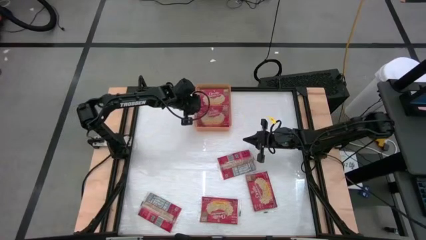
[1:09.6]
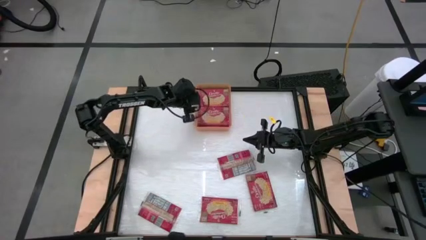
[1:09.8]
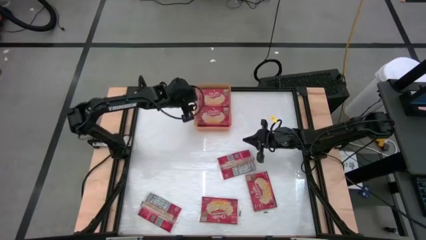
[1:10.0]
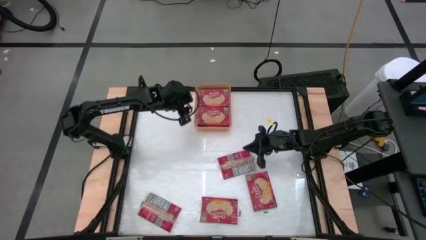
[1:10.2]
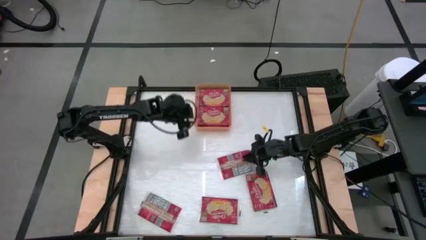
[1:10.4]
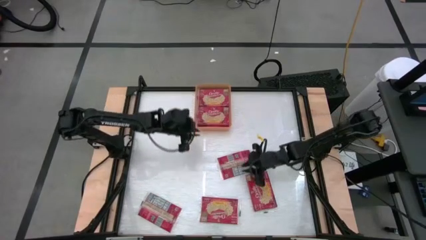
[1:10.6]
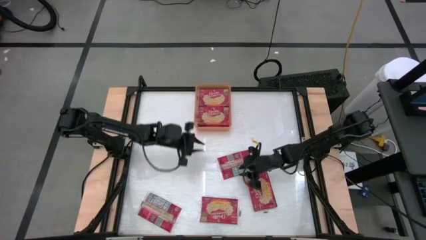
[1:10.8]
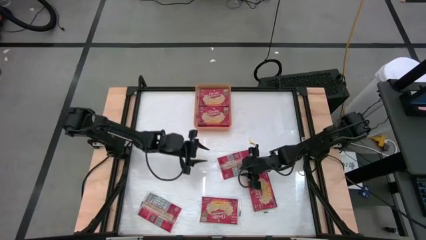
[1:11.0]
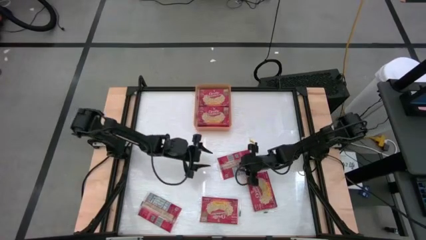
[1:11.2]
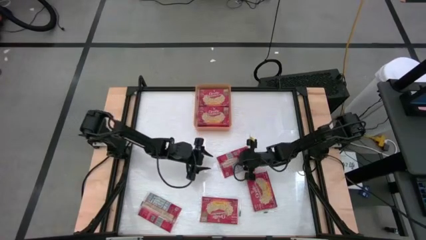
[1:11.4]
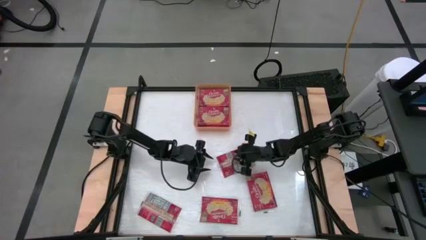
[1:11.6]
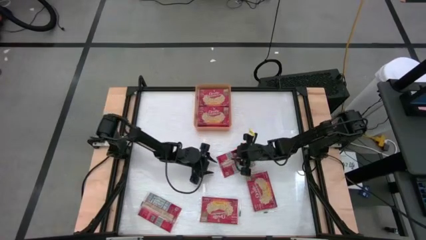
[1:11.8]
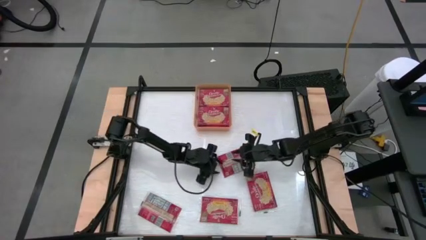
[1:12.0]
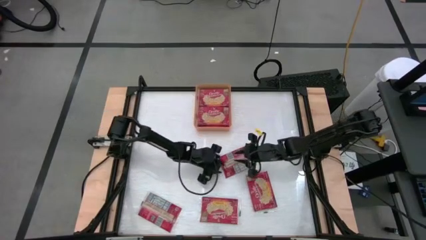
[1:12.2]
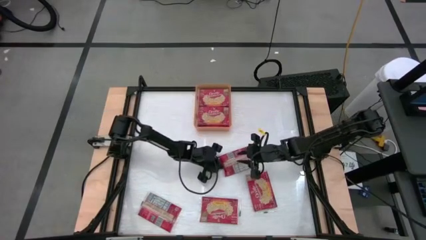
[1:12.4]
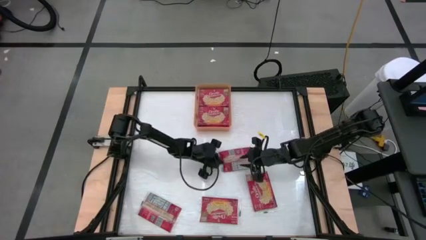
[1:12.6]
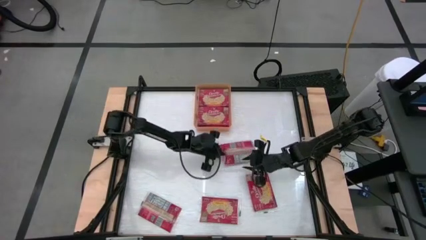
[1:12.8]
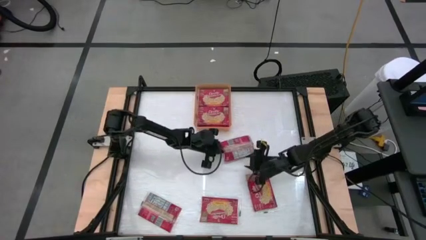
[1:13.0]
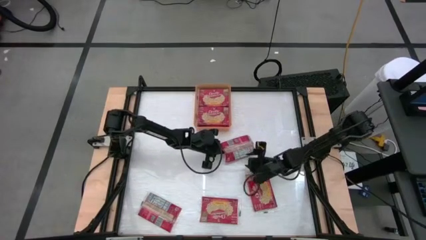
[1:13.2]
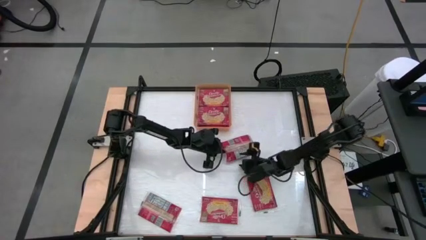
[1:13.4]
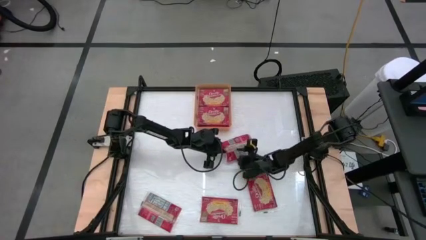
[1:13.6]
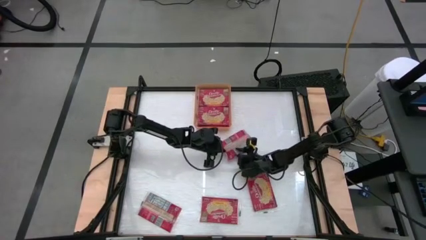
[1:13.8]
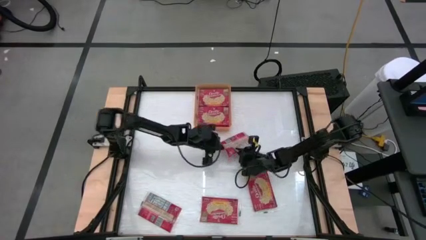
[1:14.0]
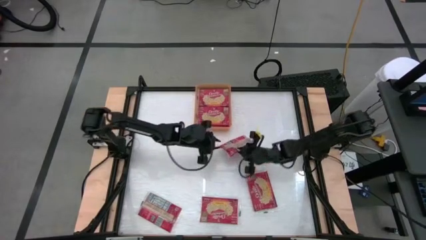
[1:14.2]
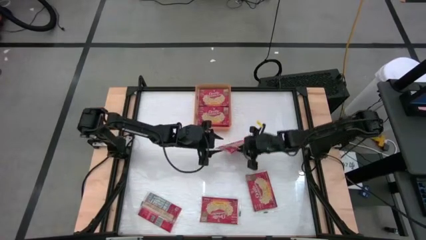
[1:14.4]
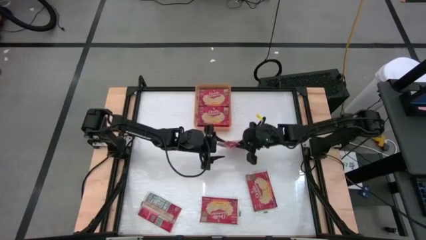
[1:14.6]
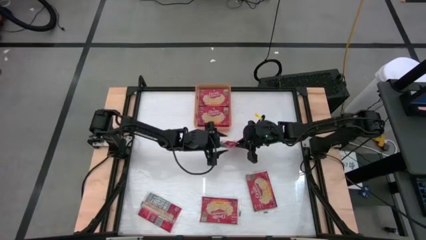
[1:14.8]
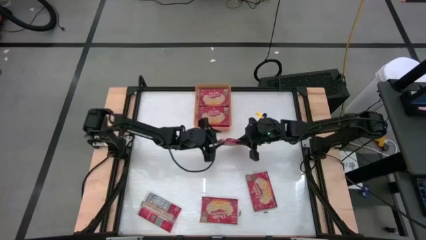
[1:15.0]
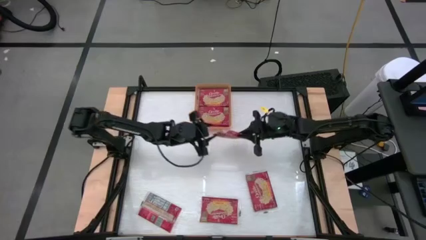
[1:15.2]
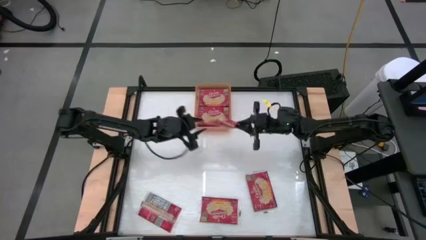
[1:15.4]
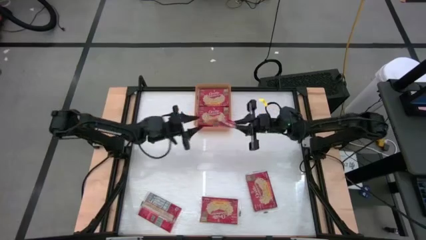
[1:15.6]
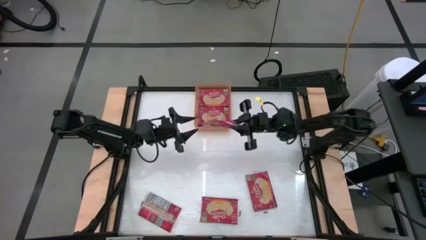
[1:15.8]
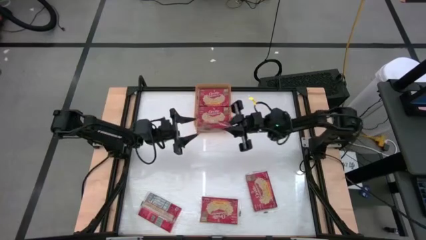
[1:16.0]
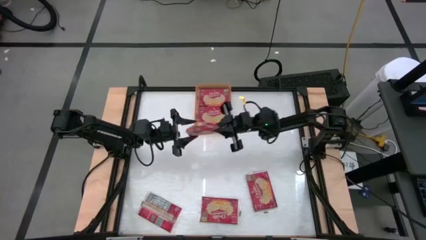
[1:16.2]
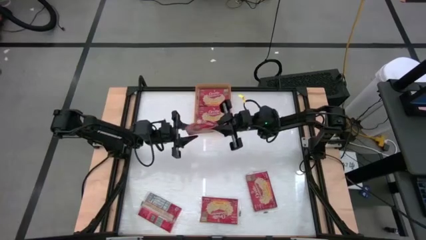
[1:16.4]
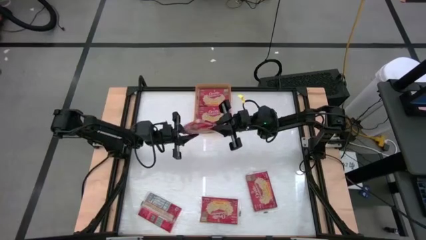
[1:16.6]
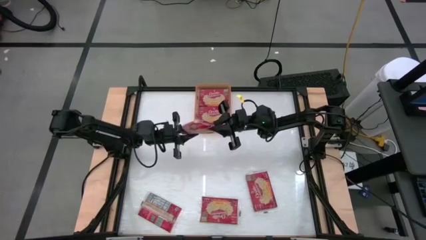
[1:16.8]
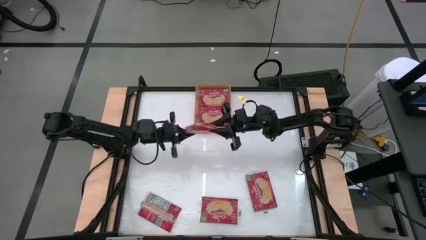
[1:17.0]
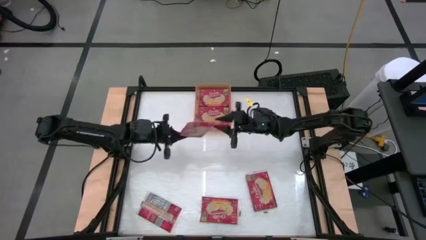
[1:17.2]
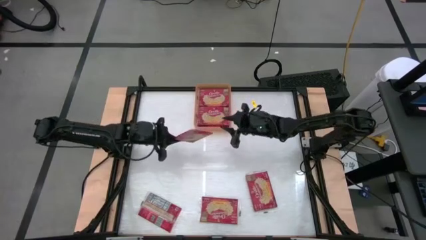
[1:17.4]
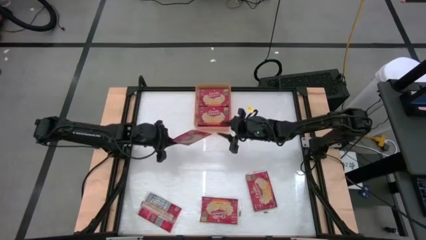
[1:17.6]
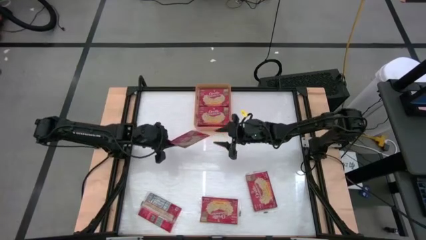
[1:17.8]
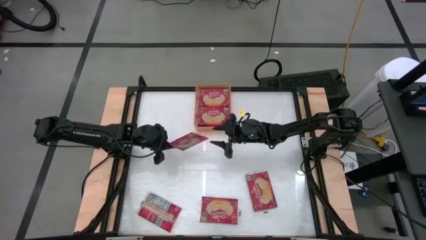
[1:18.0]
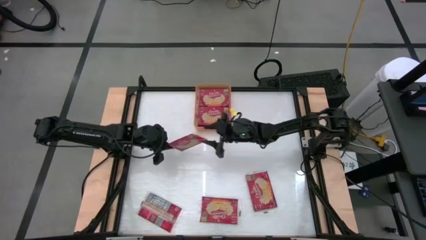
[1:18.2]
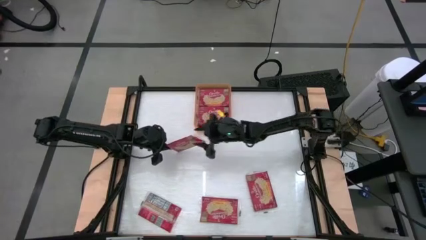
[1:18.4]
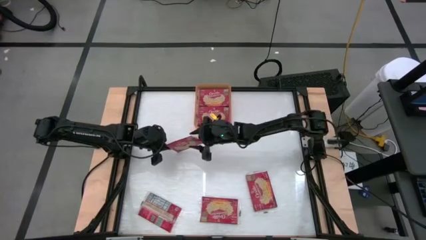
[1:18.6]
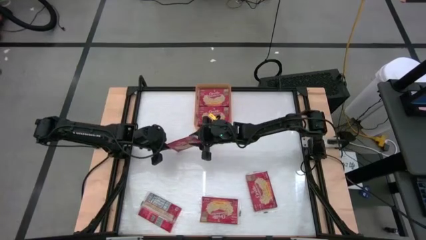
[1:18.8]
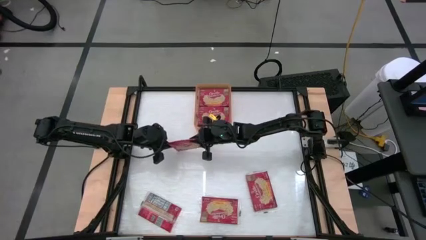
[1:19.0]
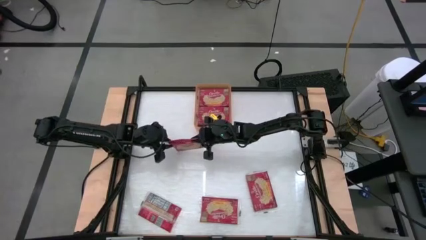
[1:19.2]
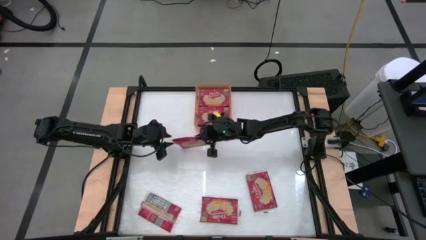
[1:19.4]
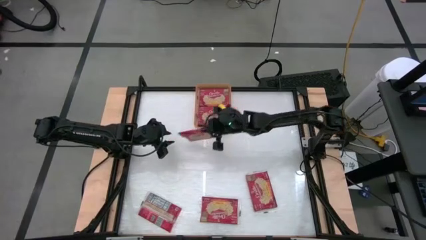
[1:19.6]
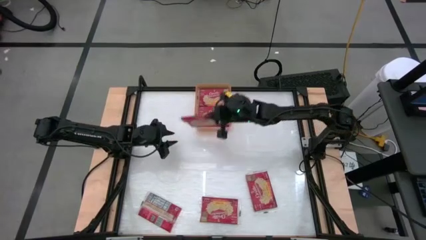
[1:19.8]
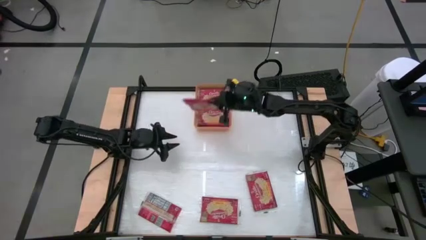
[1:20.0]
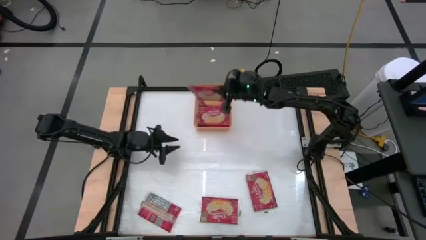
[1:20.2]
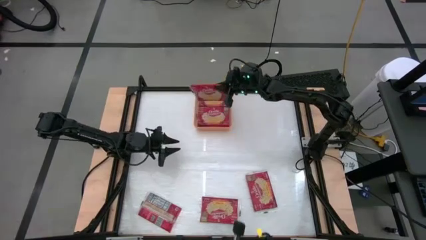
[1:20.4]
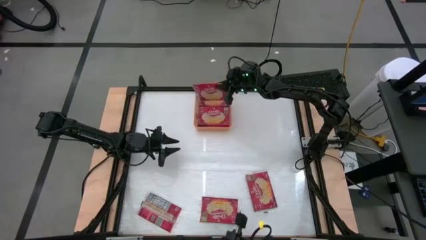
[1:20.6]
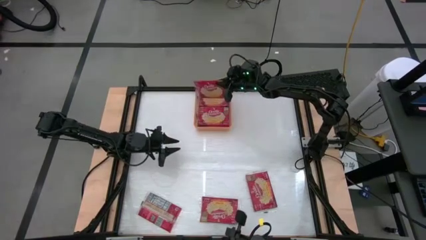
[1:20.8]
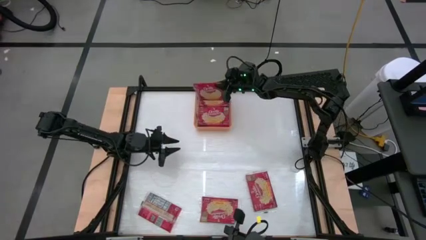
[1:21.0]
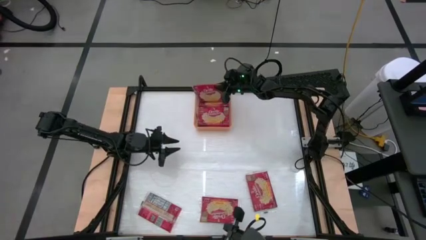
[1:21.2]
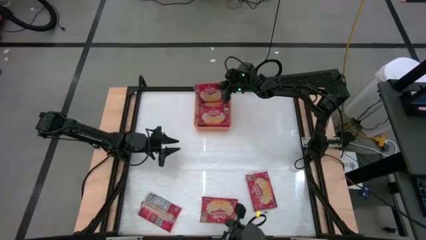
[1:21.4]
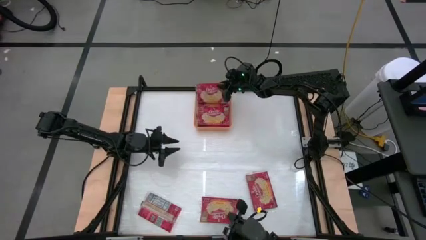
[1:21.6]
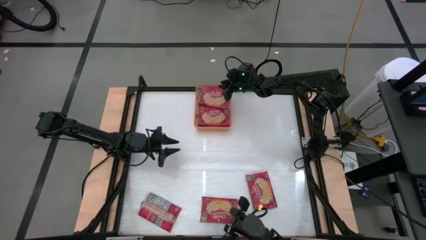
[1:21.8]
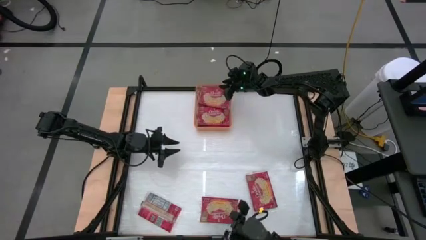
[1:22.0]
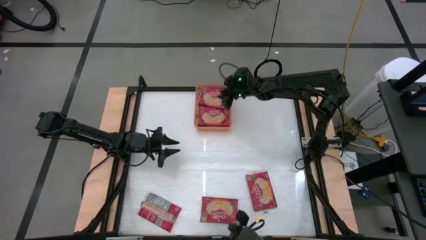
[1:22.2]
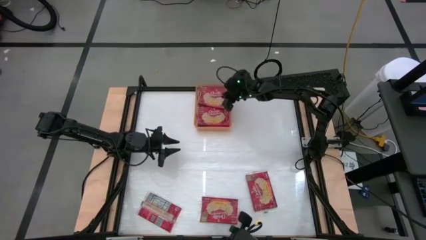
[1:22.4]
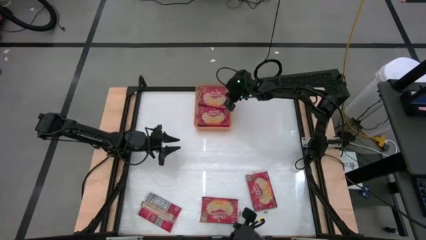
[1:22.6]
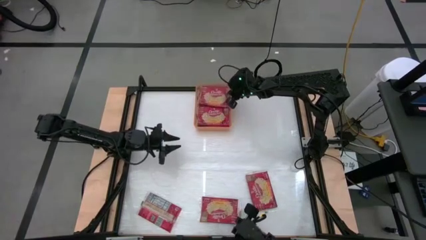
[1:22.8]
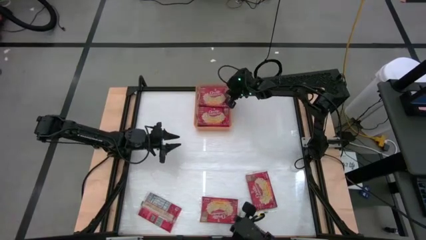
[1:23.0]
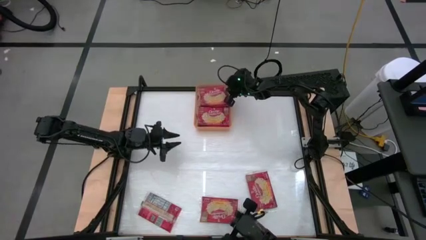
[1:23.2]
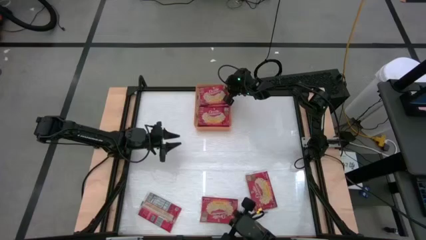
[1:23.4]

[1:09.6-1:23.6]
Task: Sort popcorn bags into baskets
Put the red popcorn bag into the orange bin

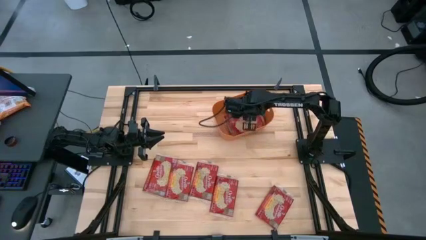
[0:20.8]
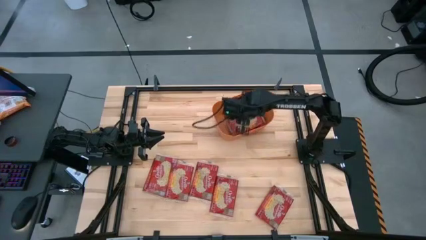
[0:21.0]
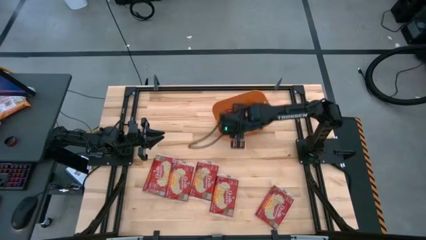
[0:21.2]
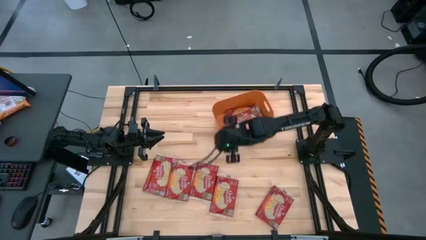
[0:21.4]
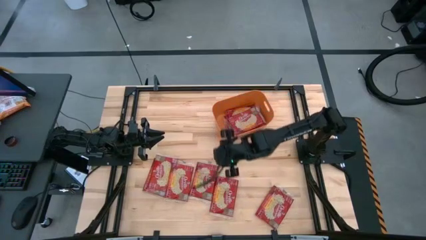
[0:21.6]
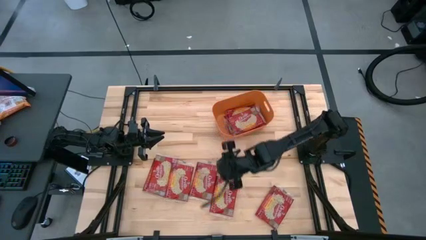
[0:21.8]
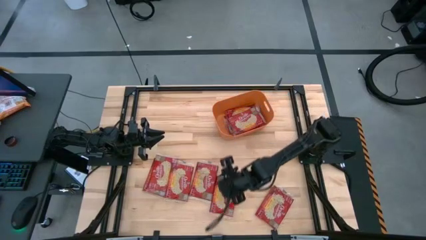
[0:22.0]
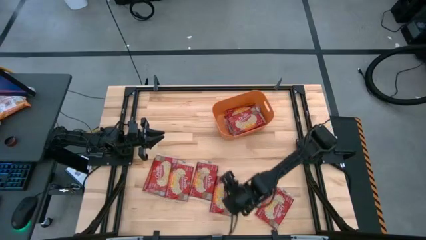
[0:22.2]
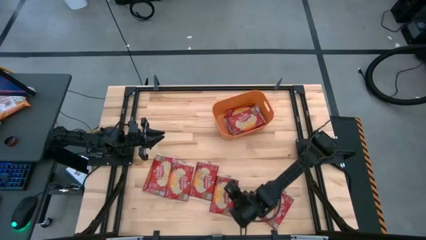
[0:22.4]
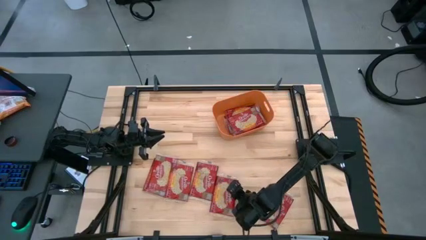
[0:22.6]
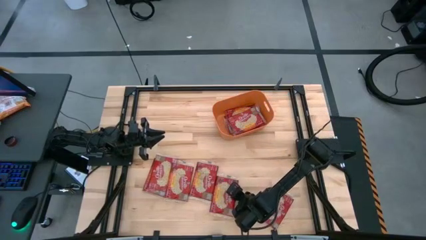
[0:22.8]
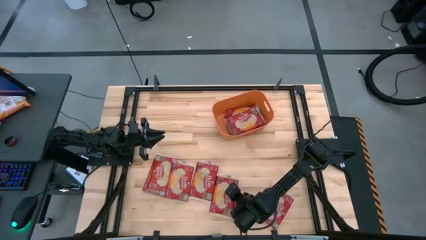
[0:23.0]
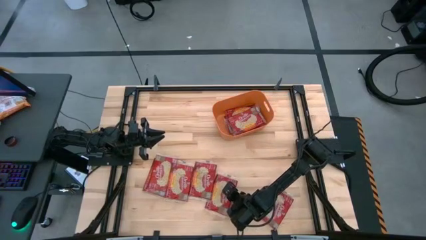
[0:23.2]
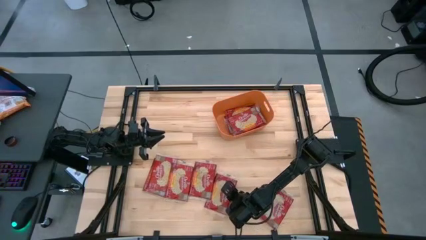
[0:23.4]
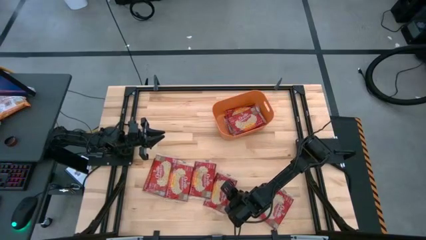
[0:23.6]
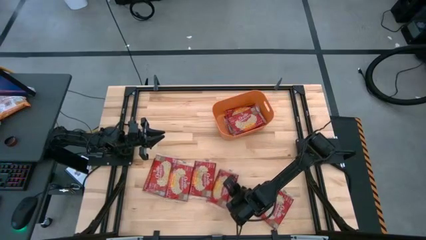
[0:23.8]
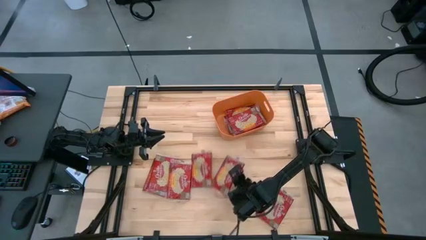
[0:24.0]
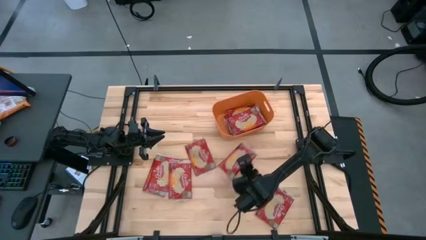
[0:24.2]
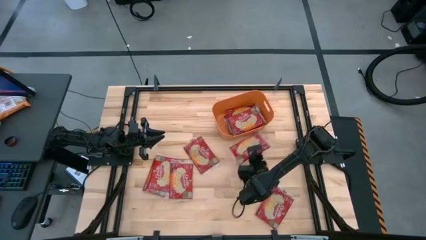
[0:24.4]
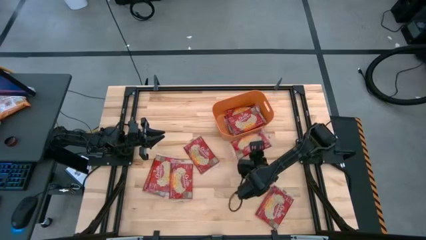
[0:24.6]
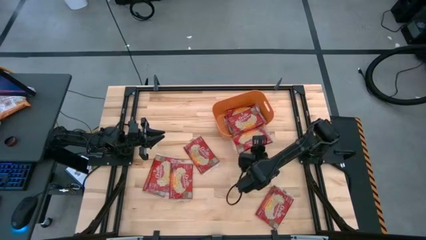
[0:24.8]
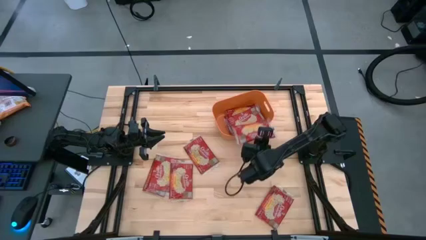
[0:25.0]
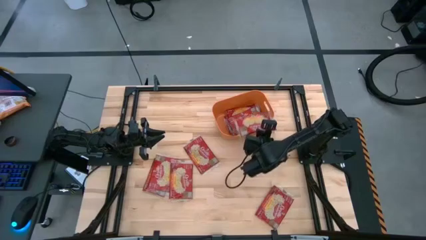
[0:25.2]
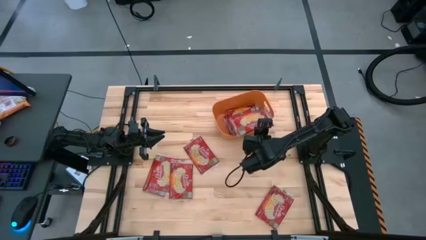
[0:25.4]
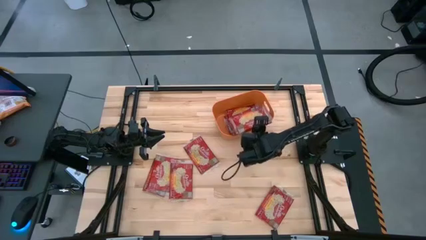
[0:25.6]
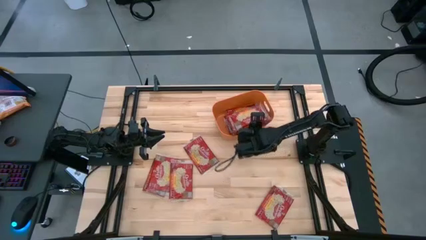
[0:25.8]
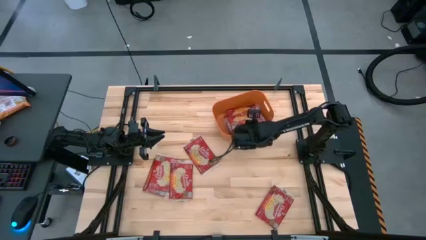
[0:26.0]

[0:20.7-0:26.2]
Task: Sort popcorn bags into baskets
Put the popcorn pack into the orange bin
